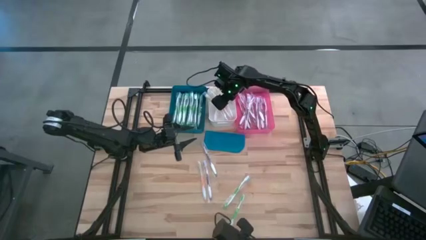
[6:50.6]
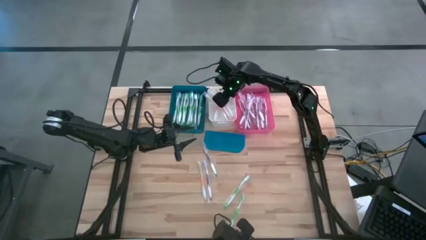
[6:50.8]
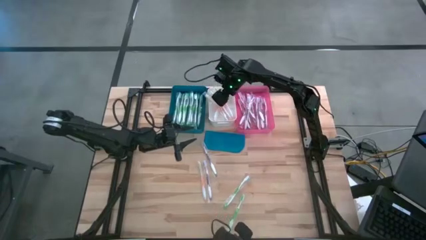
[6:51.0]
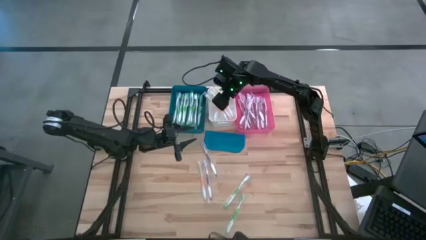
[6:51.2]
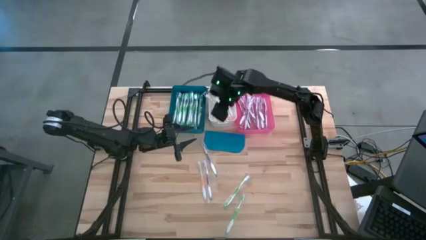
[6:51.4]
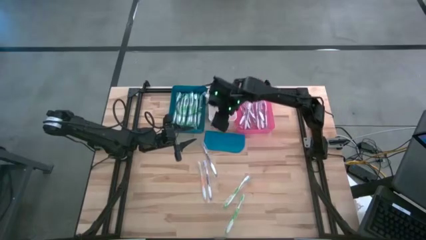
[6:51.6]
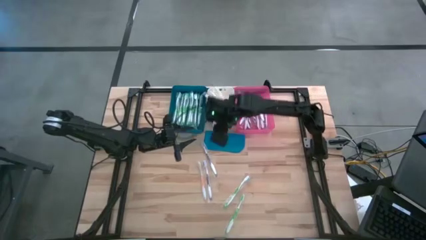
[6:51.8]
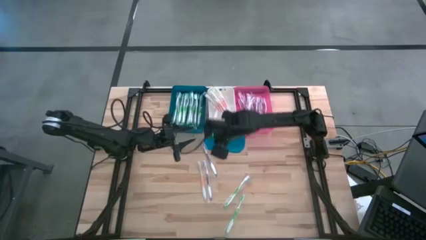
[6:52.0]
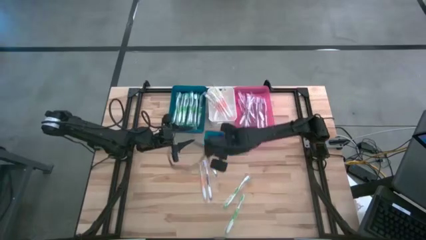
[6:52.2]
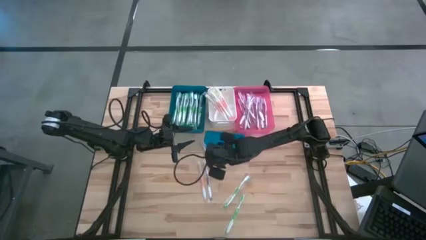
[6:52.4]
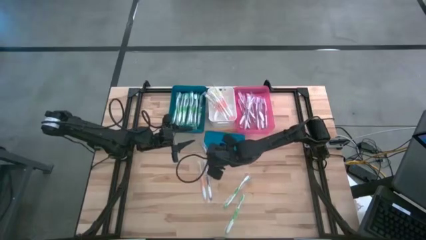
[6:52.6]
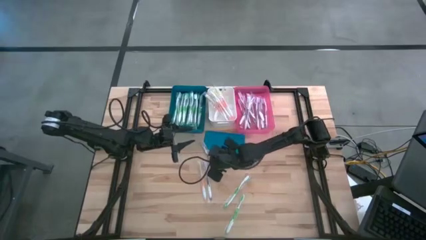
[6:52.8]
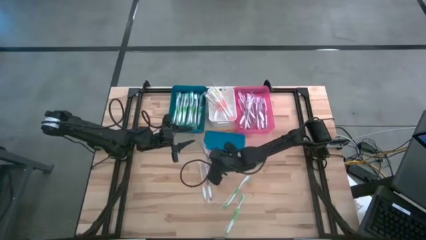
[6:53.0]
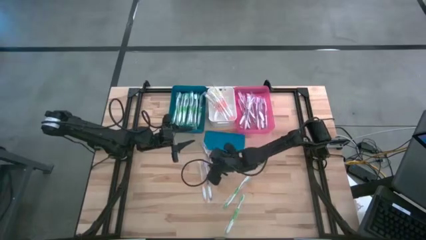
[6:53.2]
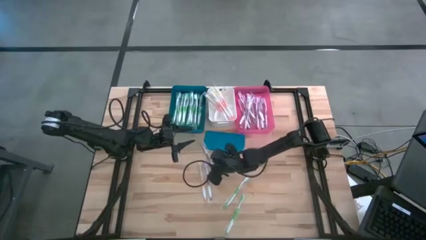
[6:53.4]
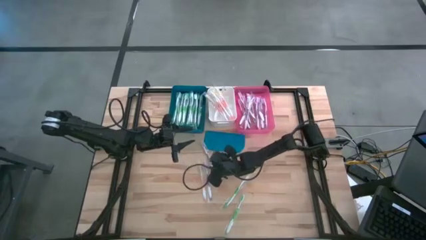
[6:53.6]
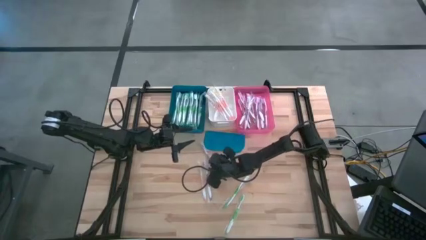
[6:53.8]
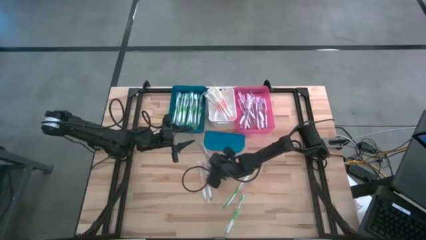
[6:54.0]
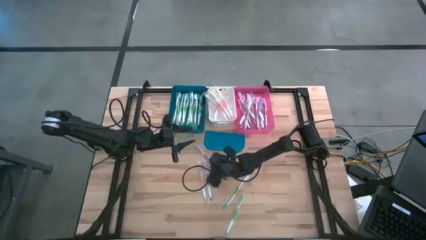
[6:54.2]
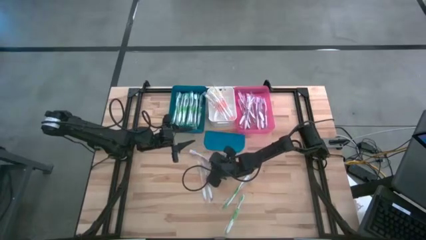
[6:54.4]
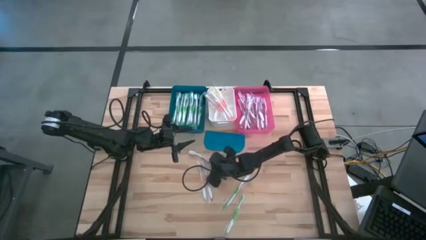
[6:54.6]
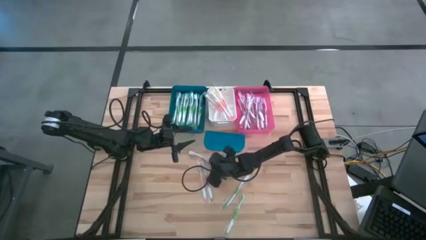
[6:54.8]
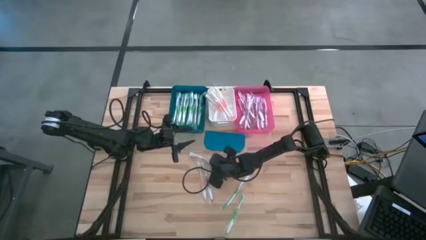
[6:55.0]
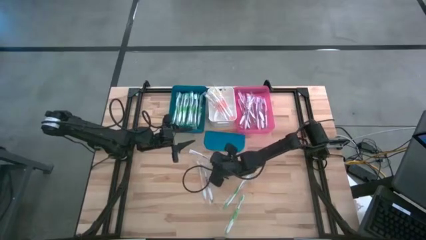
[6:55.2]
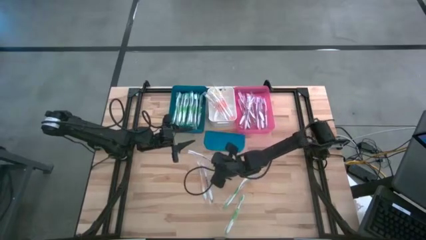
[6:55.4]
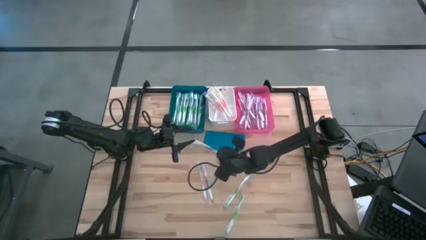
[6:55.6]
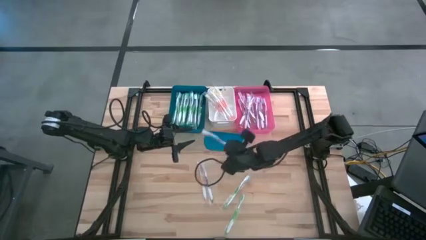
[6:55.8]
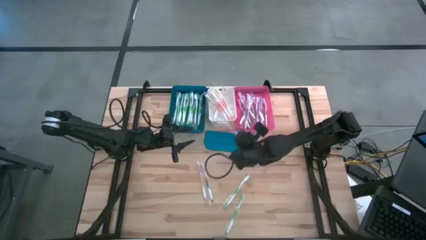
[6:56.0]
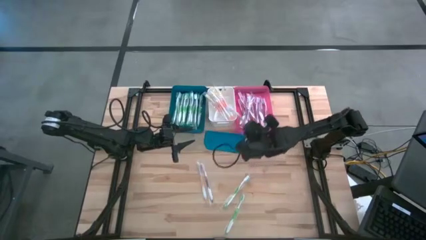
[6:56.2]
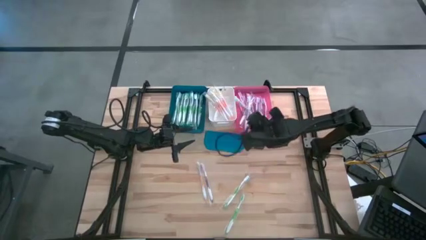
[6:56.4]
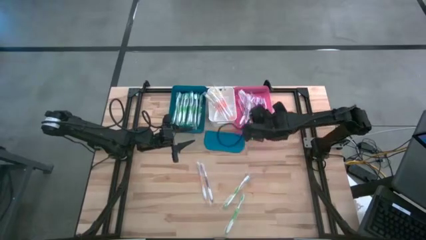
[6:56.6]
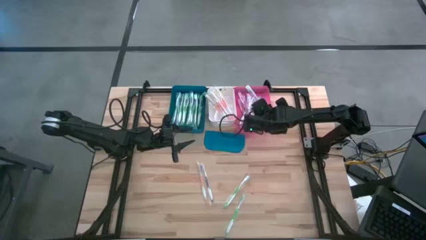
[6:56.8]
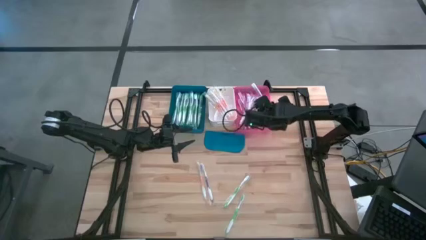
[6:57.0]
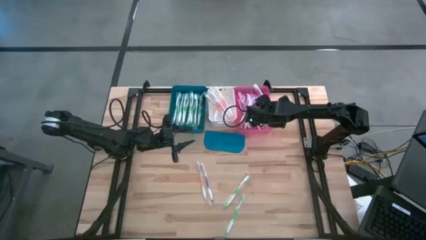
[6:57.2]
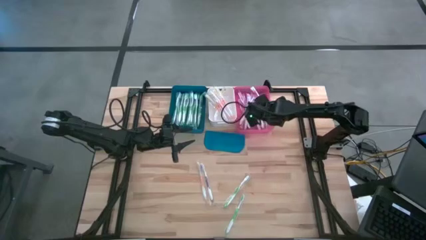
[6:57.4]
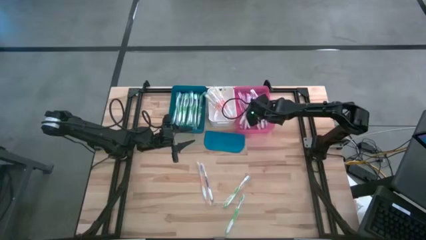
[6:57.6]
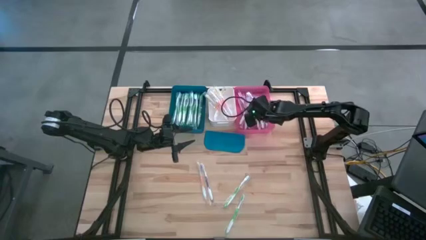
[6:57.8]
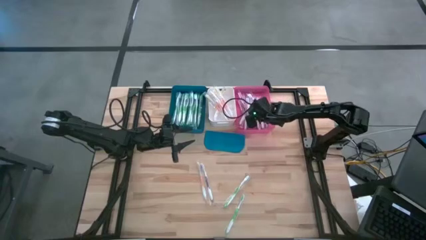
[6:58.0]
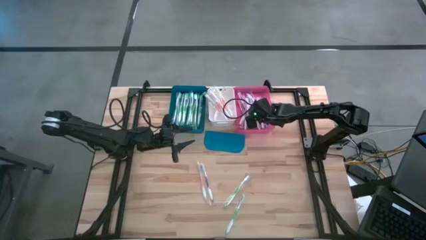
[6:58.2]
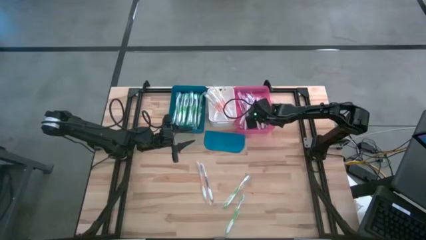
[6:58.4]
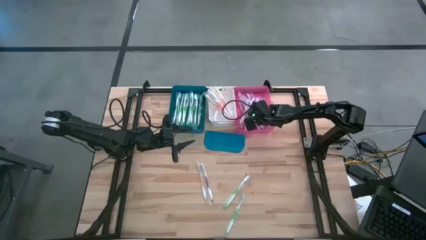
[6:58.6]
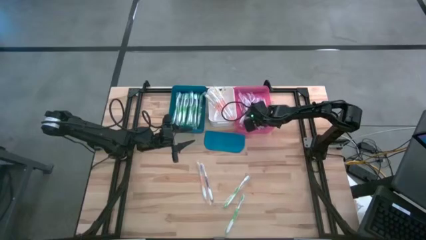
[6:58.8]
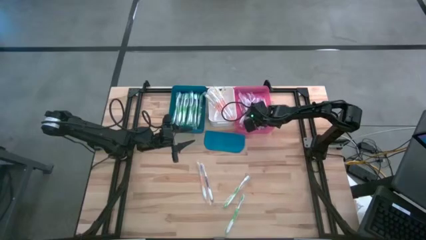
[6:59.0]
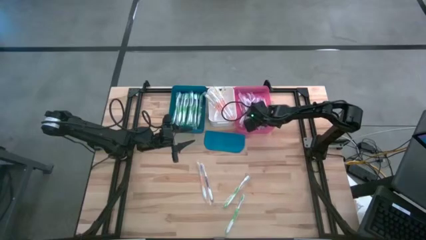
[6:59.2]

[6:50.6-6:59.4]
Task: Pick & Place Toothbrushes
Put the right purple toothbrush into the pink bin

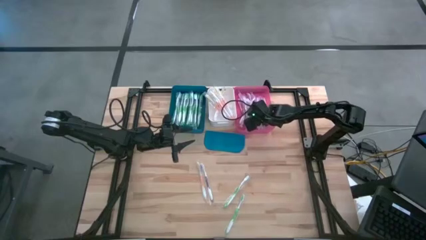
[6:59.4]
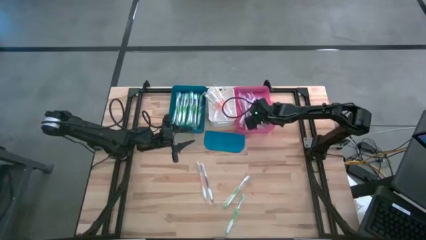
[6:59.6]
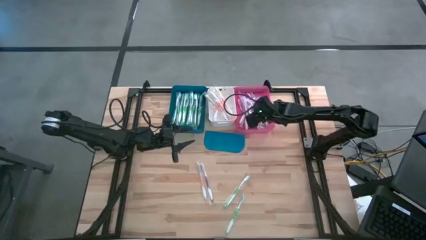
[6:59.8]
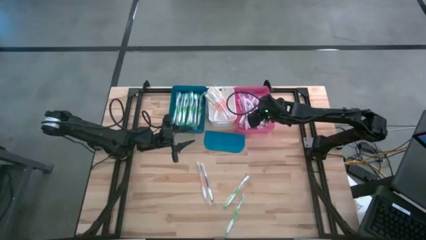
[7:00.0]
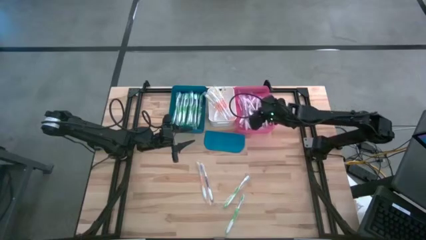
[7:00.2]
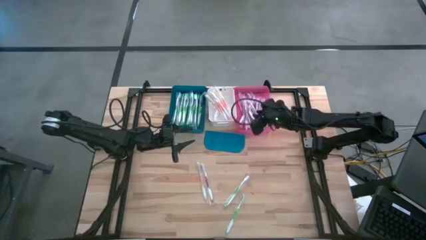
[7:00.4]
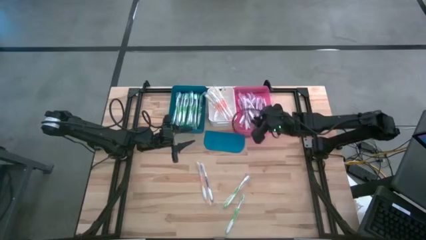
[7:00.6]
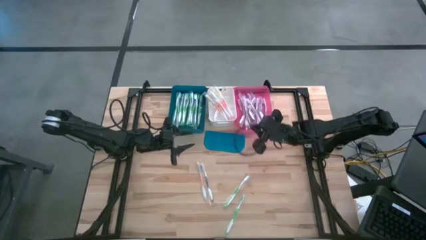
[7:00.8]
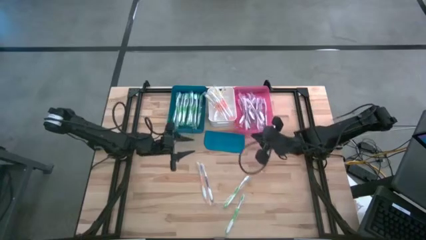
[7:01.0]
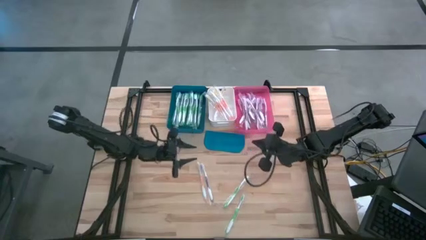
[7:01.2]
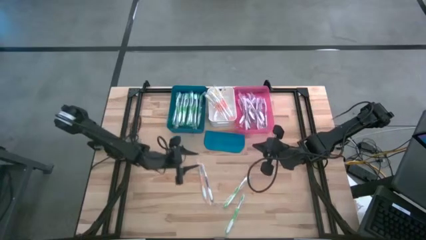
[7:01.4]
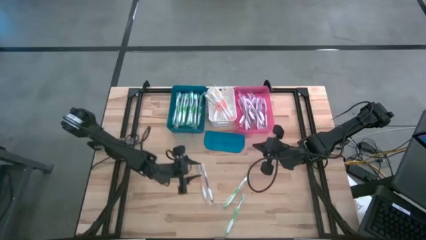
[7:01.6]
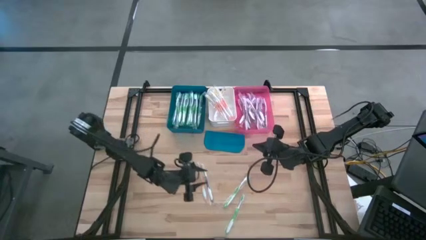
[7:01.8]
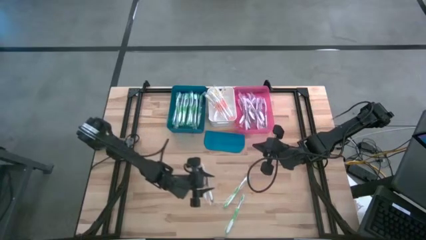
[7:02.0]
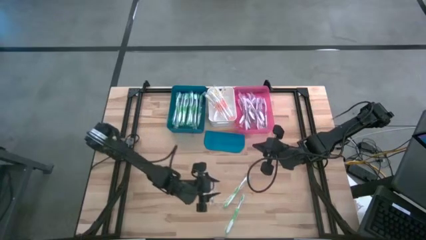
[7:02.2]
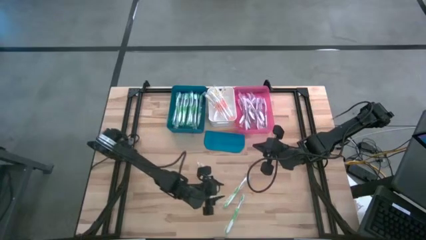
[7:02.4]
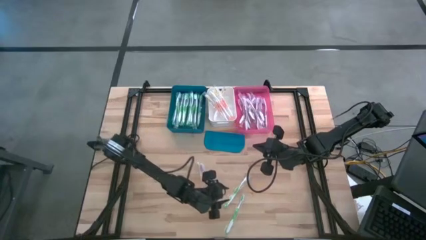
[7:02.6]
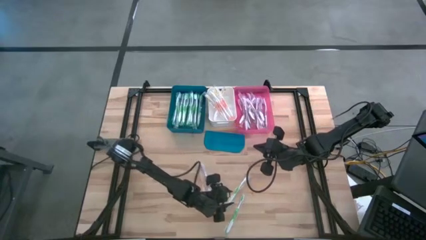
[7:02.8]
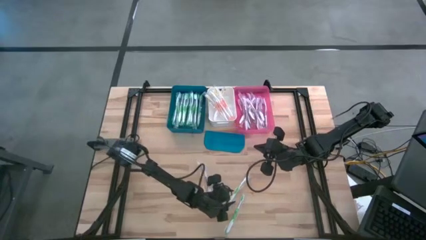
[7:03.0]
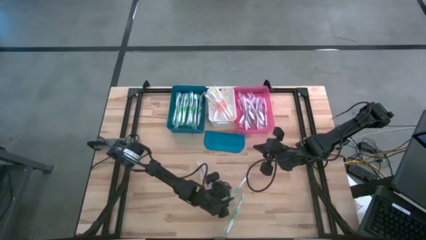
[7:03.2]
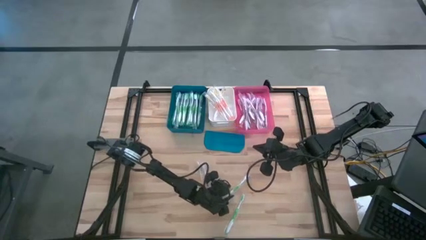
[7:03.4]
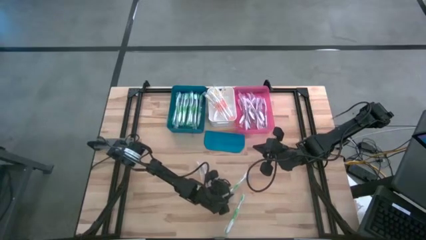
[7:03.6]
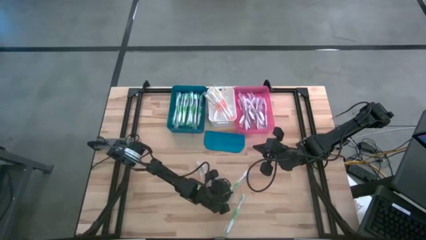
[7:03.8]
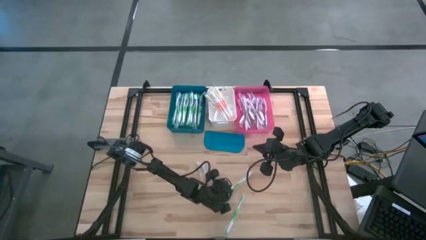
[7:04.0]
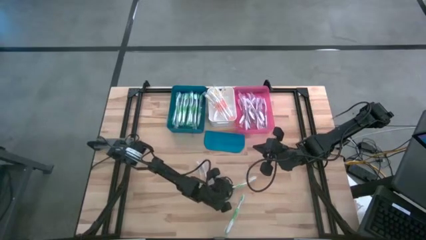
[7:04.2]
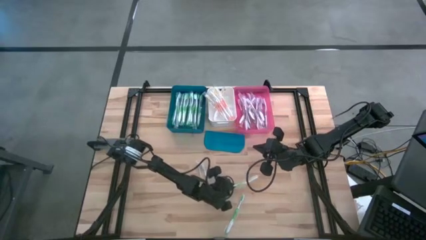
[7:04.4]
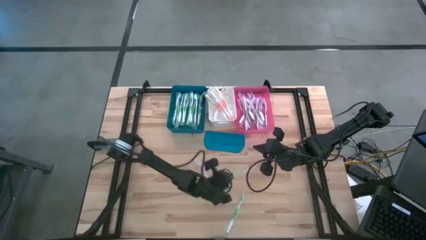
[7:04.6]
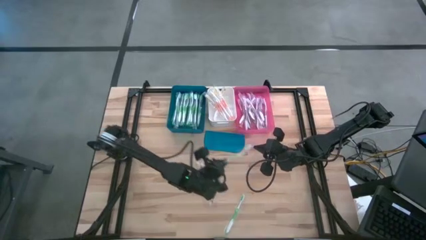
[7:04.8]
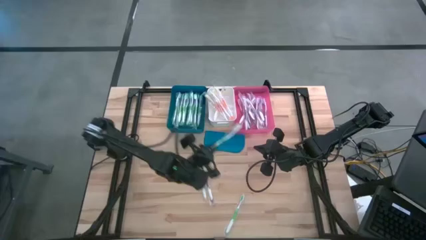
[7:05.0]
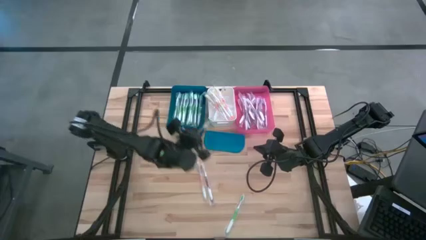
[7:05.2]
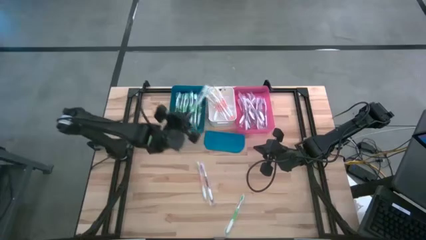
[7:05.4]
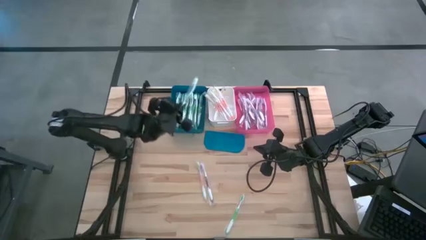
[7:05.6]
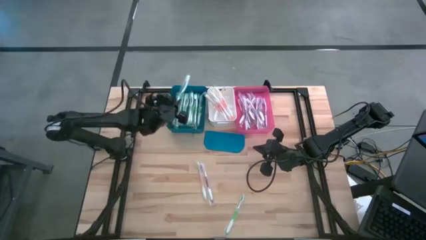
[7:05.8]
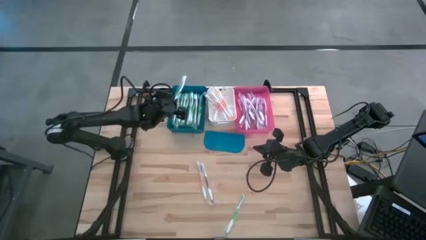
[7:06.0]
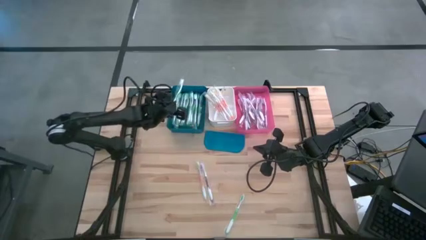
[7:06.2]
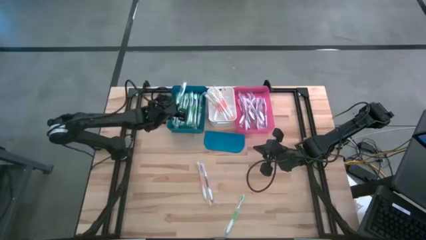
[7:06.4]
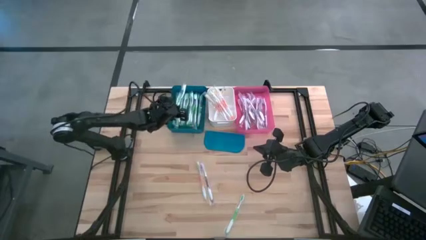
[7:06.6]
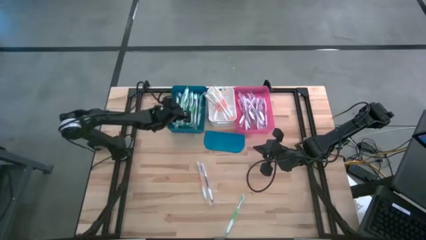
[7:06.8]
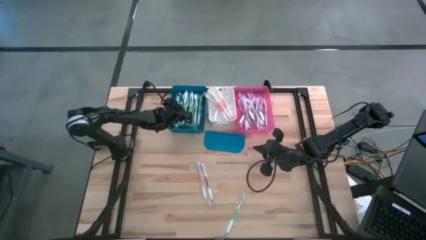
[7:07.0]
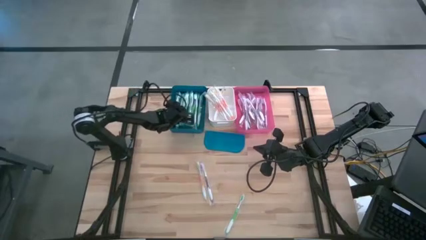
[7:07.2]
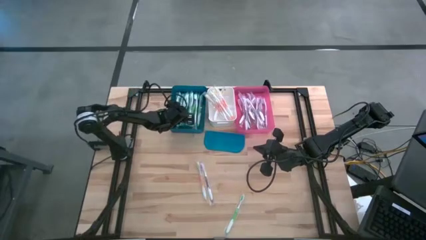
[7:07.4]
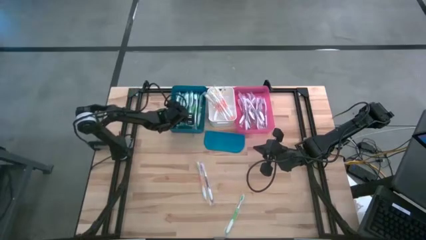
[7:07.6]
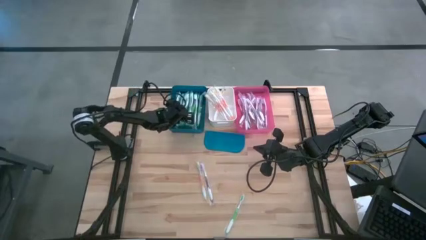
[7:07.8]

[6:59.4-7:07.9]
Put the left green toothbrush into the blue bin
